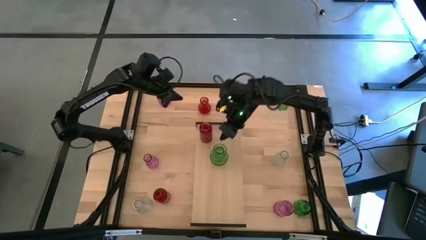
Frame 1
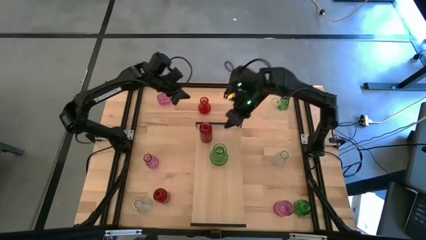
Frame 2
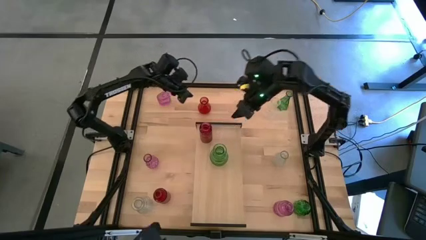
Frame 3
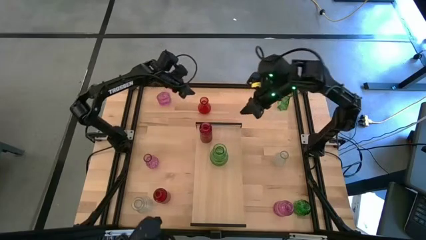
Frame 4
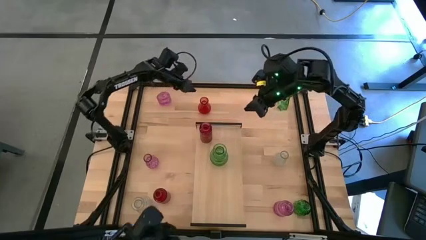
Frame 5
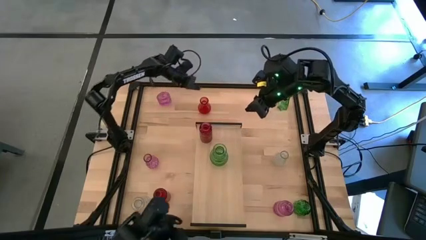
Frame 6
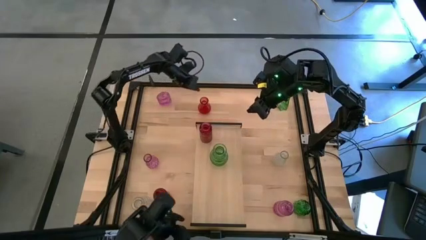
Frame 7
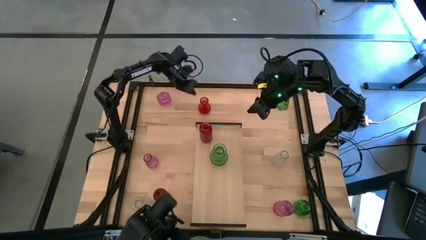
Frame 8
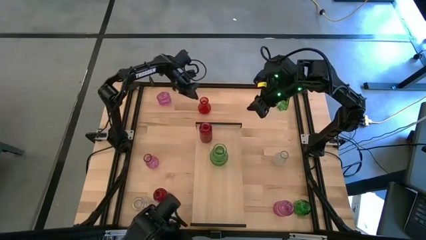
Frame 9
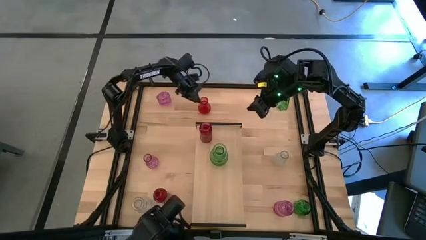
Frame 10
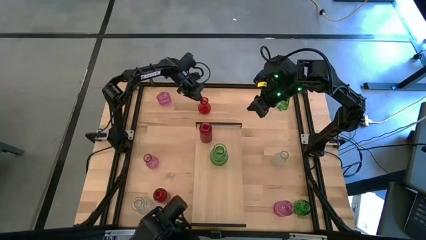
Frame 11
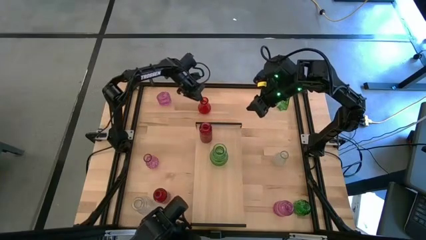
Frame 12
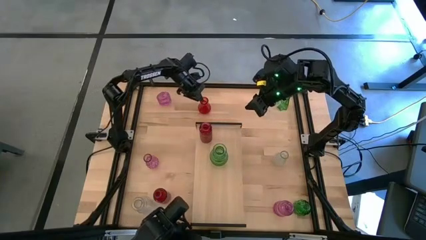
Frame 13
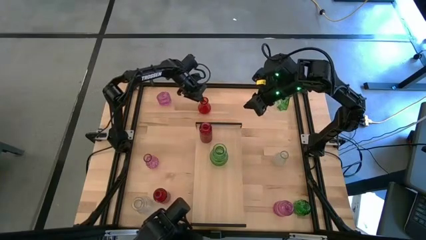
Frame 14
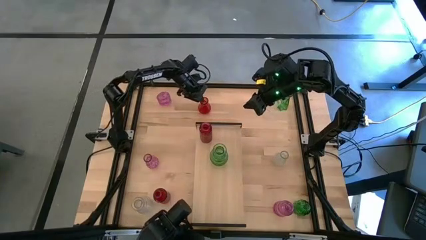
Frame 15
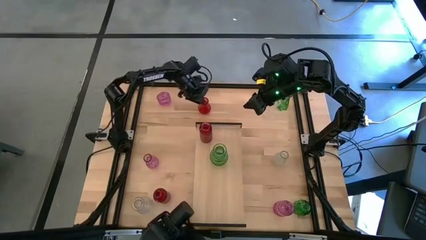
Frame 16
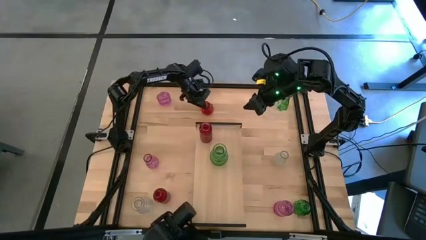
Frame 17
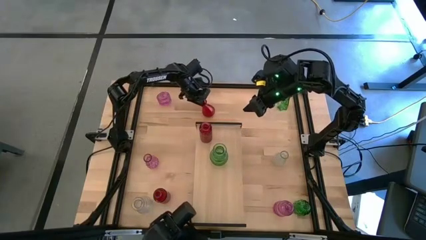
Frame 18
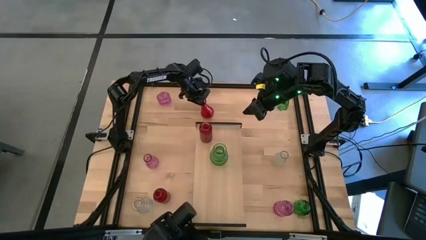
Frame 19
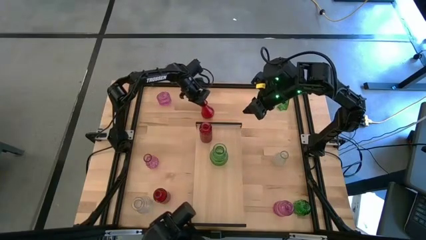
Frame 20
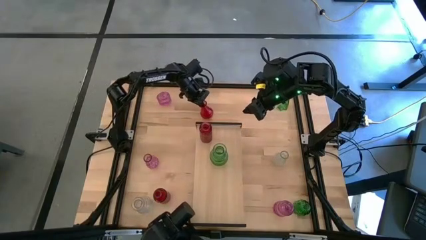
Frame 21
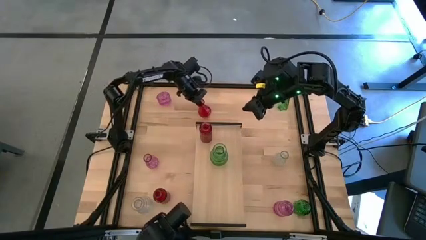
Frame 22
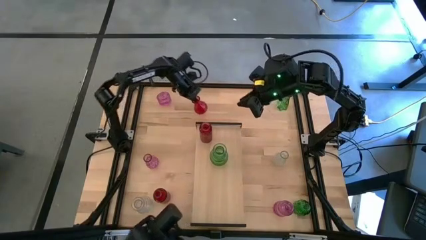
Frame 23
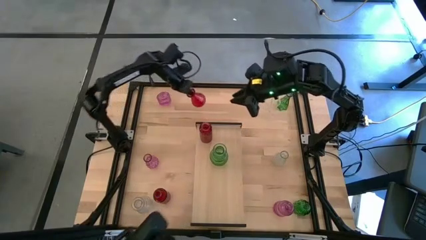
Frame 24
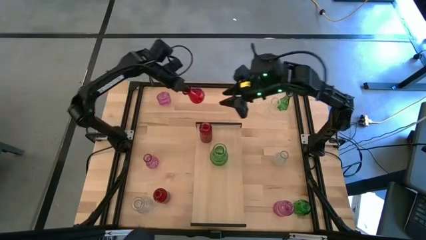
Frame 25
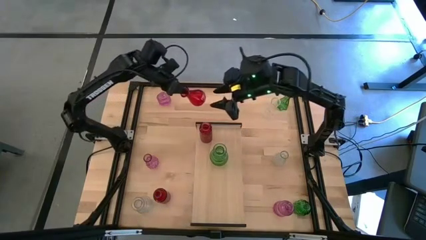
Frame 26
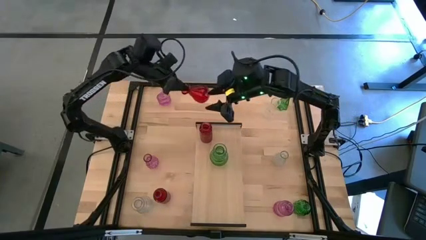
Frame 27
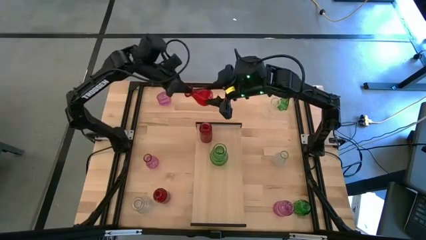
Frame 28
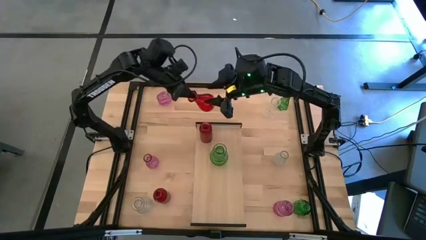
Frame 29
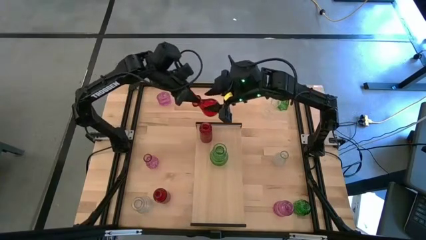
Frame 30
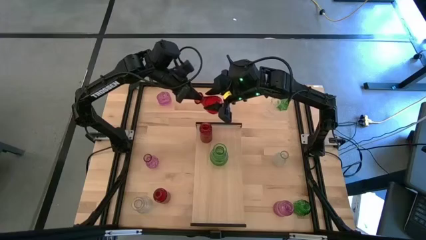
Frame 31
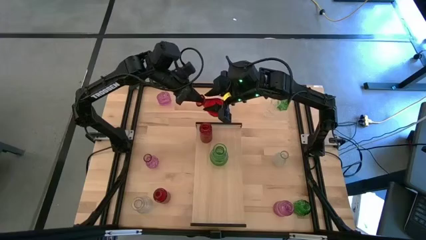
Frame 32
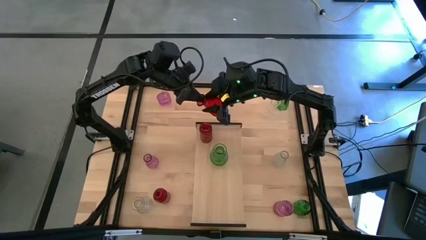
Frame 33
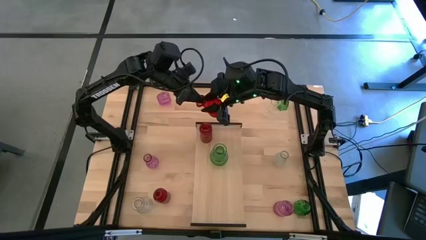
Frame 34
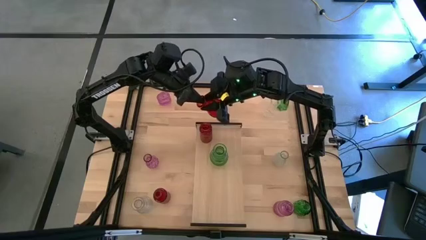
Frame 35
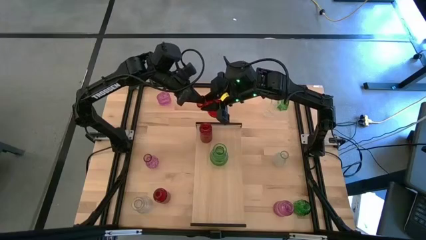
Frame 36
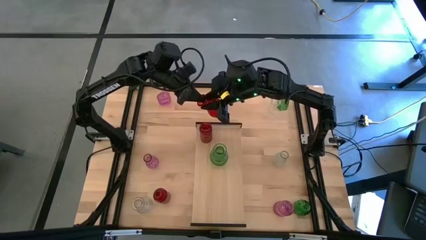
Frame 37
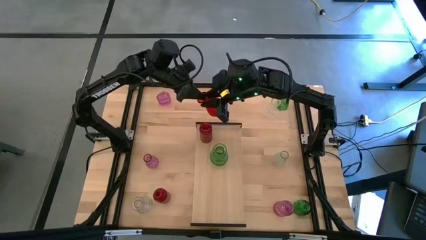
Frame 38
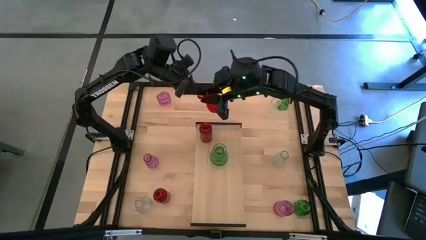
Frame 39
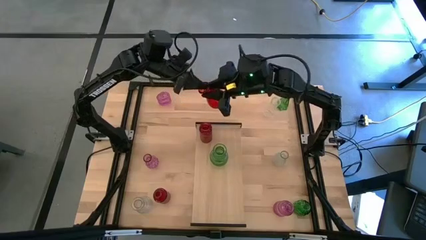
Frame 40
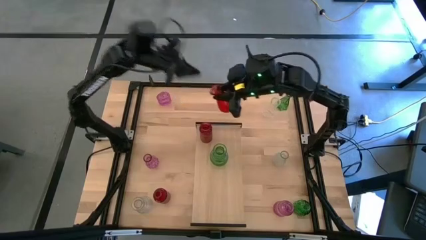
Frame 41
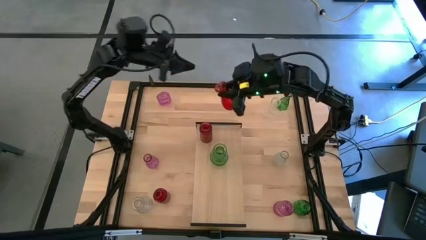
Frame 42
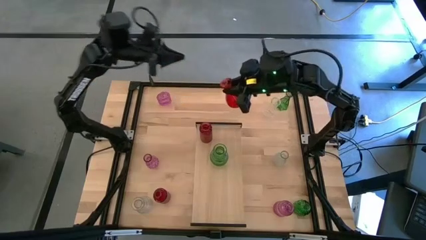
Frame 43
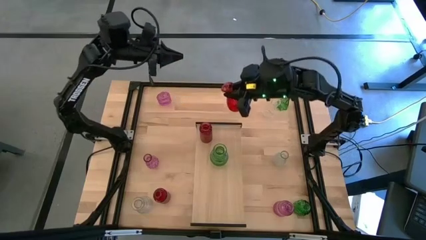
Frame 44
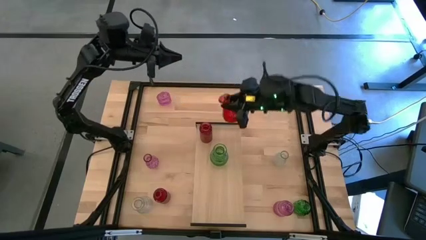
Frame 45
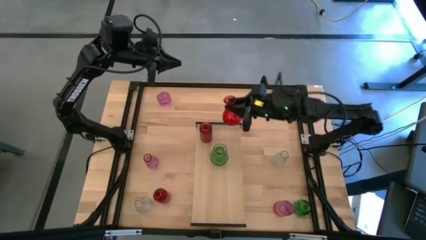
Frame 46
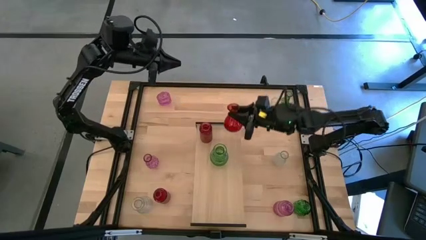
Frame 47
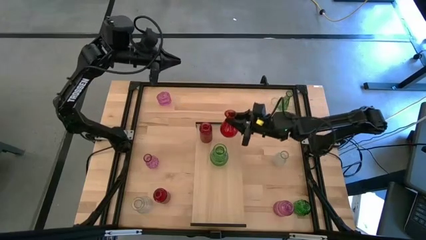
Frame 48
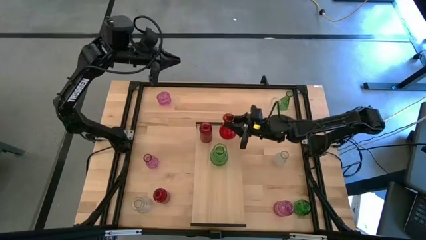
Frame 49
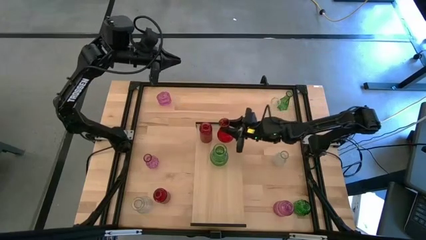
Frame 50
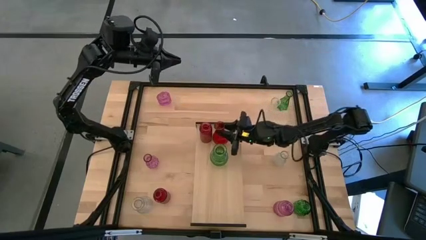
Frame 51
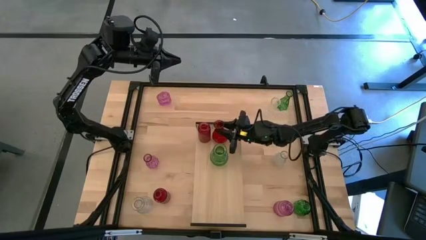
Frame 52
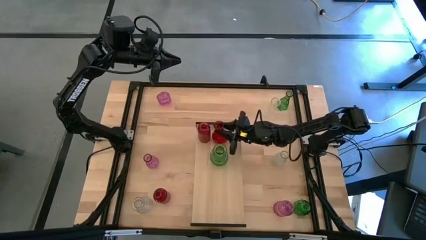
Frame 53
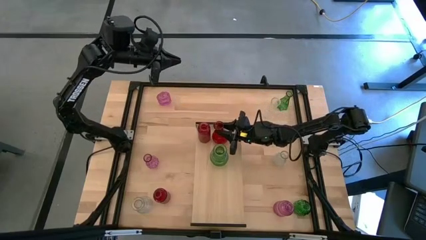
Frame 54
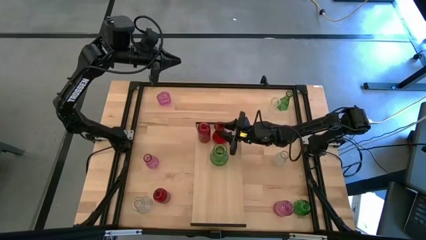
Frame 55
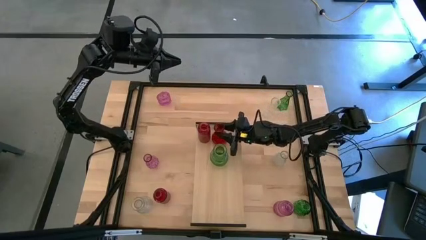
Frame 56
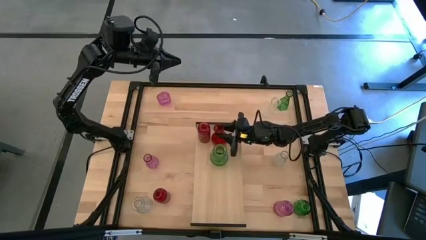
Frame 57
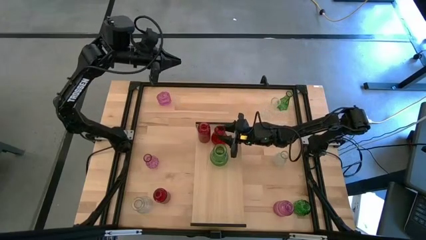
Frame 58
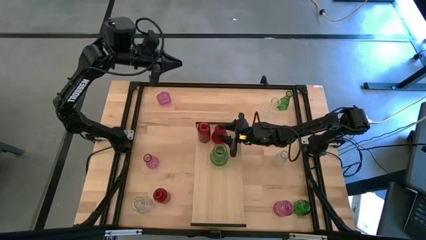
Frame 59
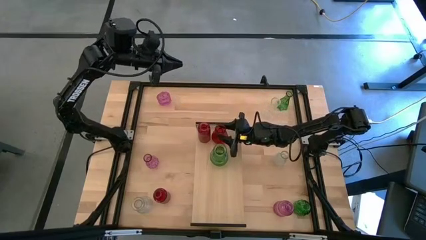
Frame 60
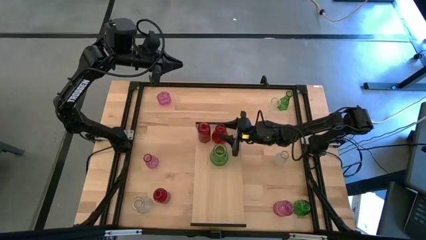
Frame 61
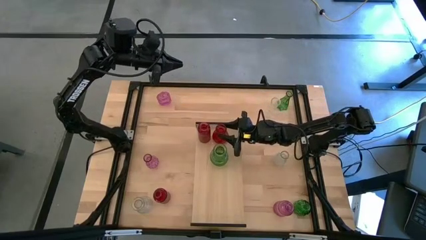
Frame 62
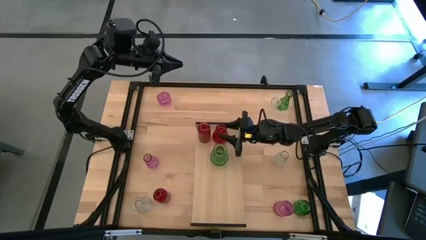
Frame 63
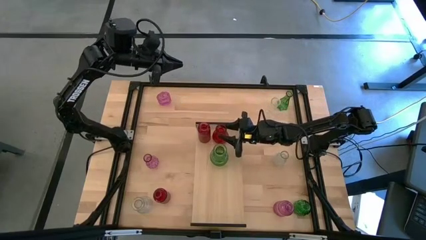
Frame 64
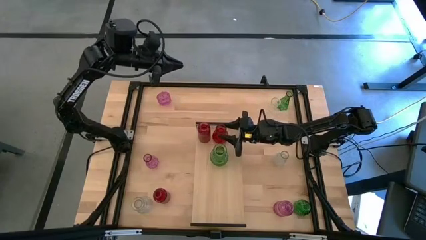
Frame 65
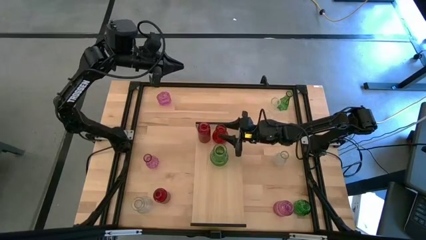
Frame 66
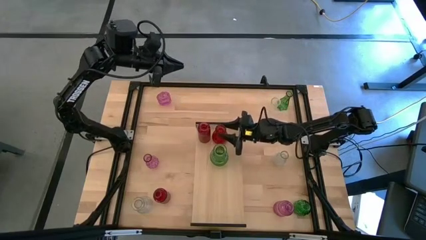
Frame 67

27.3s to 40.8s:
Task: sort vases onto shelf
Put the top red vase on the shelf aligned with the other red vase

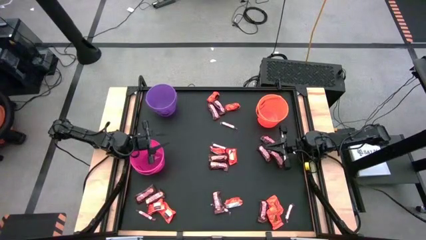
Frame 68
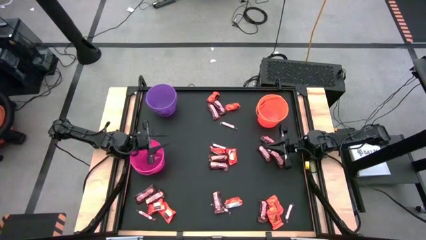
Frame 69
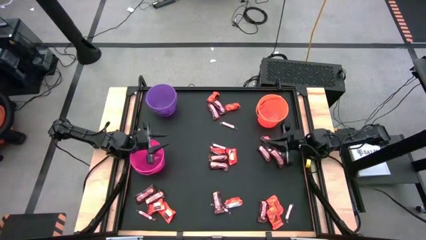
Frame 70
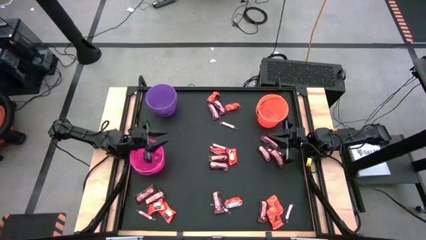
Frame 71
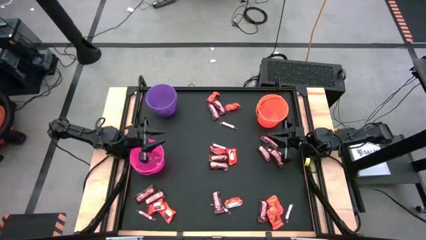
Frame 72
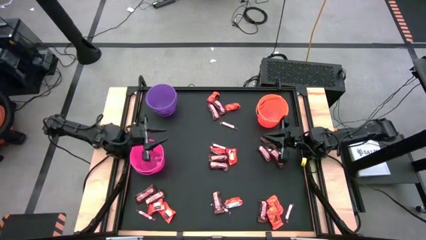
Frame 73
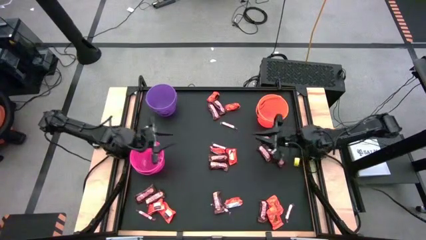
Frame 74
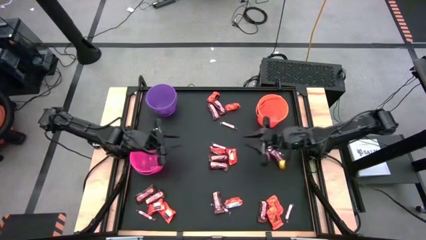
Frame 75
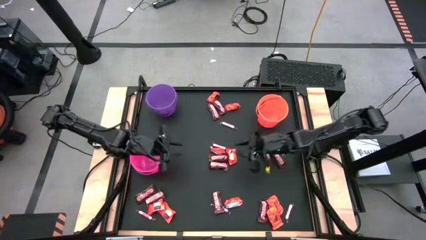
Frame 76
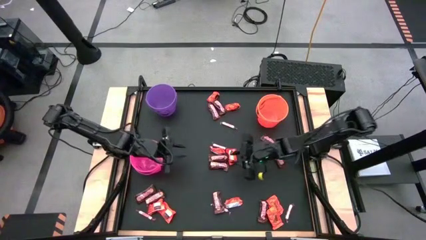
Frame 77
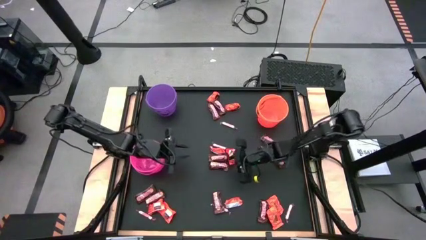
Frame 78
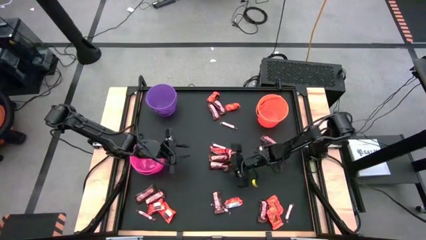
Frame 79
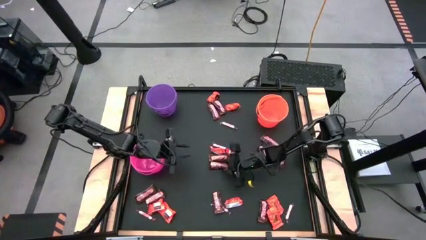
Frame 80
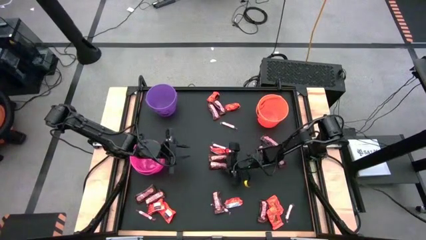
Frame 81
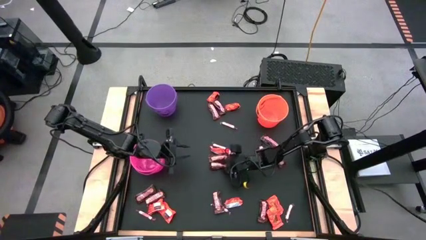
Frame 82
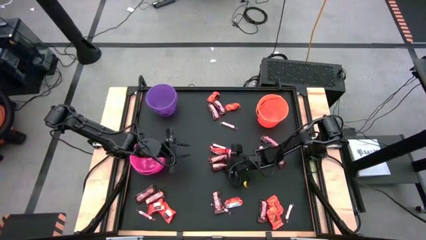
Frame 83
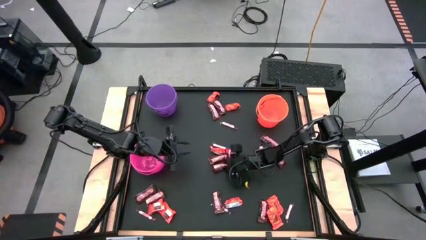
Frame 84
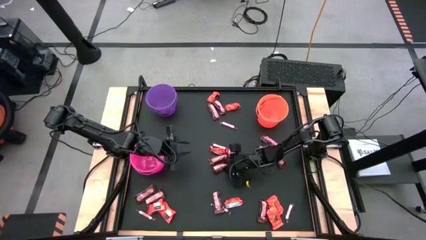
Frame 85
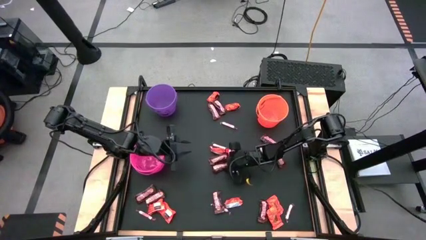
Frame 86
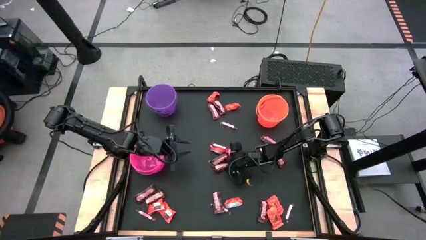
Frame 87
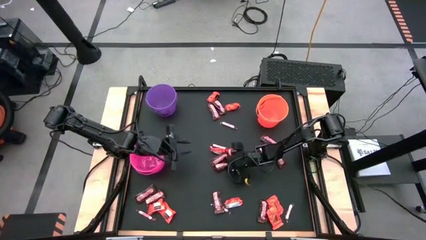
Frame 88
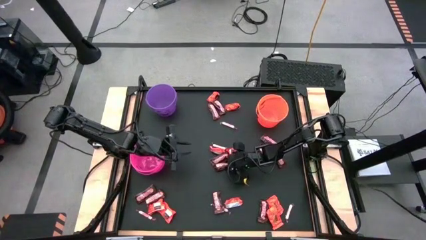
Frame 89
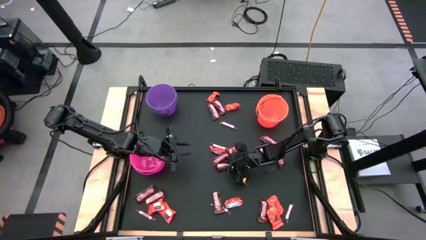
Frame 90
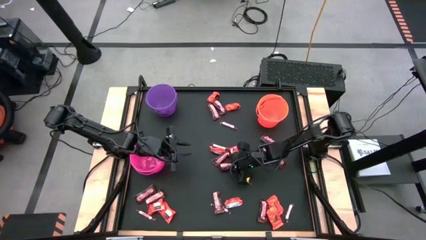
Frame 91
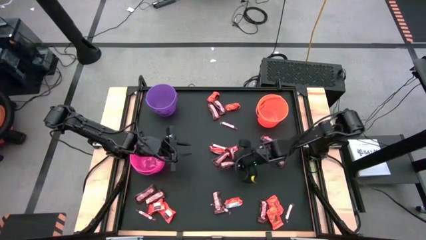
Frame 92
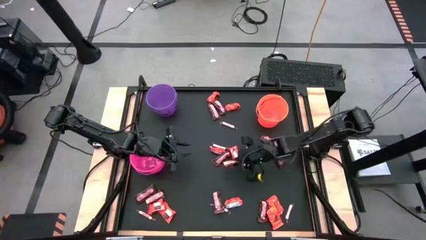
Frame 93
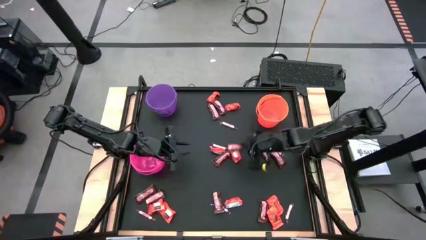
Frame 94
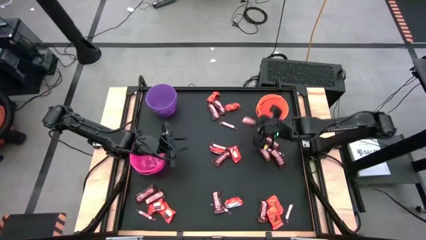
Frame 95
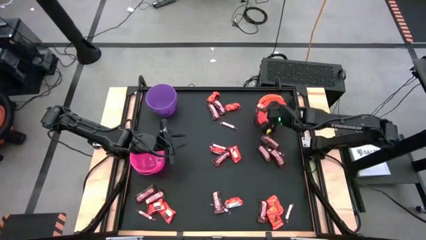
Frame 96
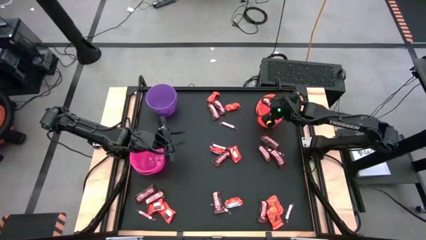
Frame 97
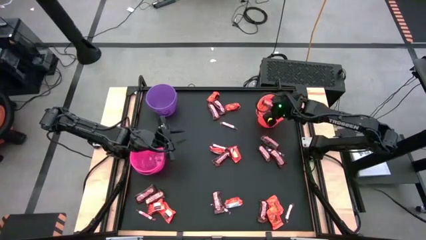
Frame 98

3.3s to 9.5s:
Task: Sort candy by brand, put in halloween buckets
Put the brown candy into the orange bucket
